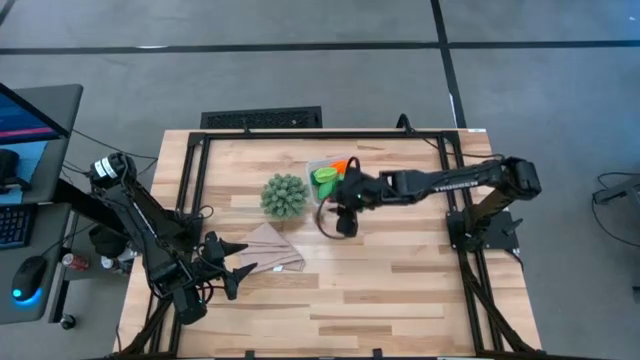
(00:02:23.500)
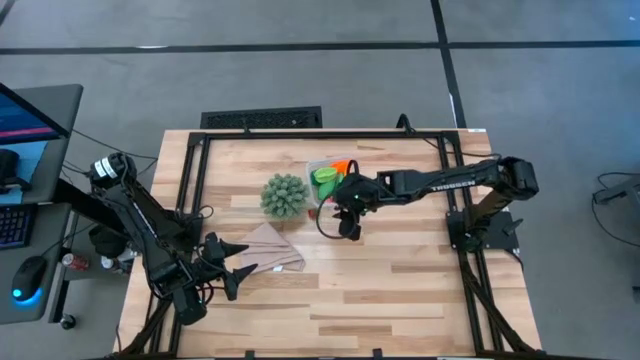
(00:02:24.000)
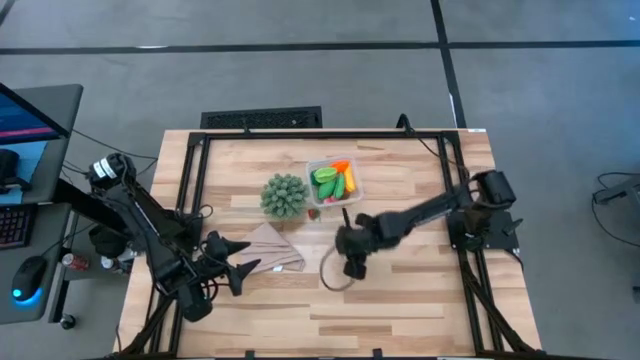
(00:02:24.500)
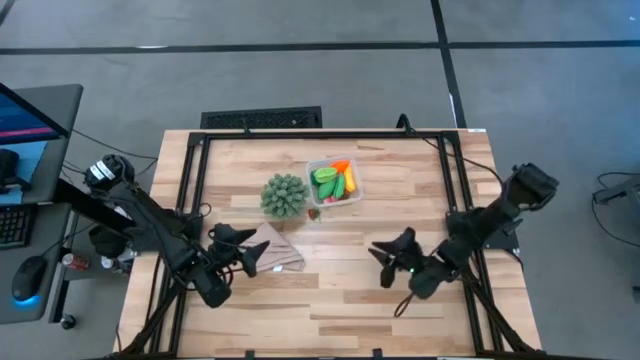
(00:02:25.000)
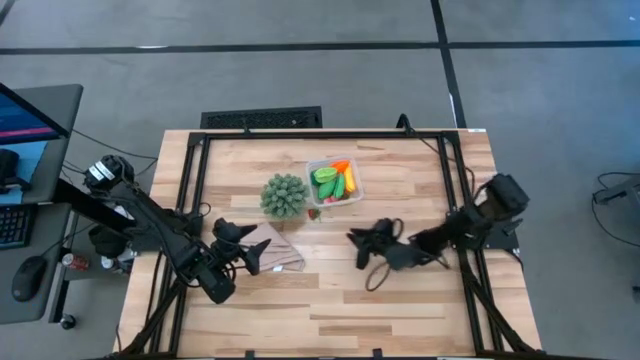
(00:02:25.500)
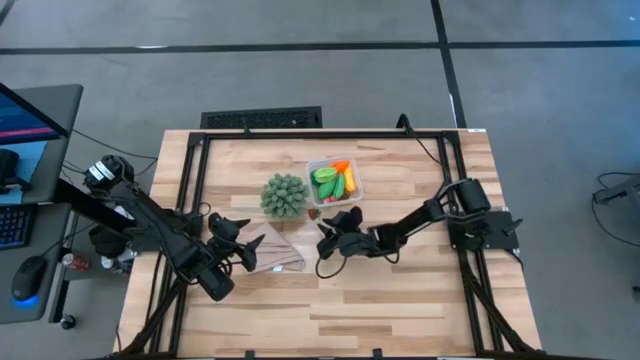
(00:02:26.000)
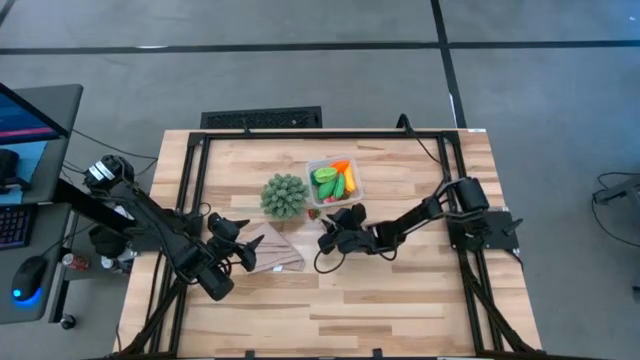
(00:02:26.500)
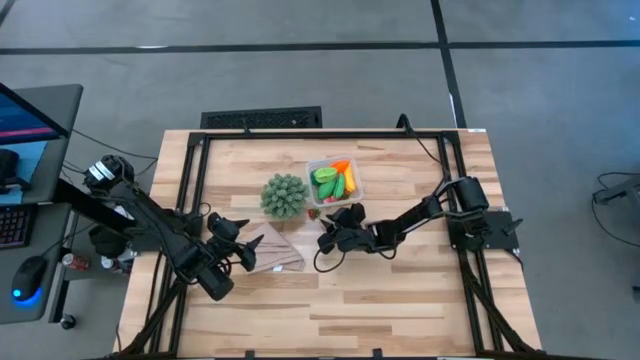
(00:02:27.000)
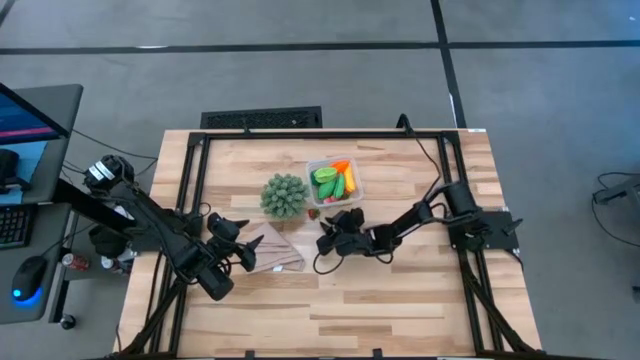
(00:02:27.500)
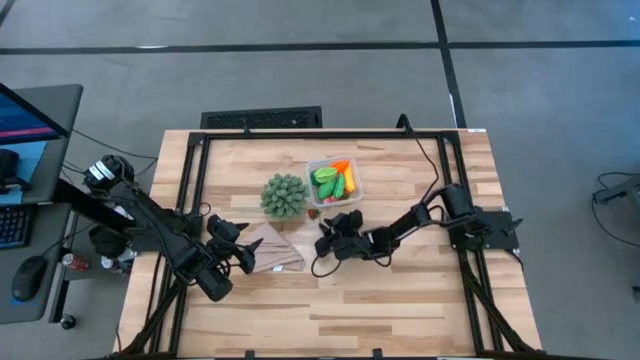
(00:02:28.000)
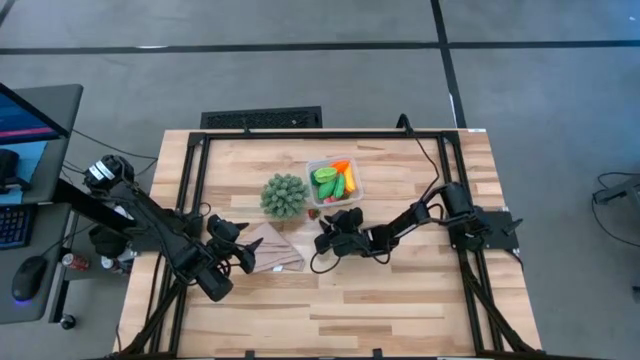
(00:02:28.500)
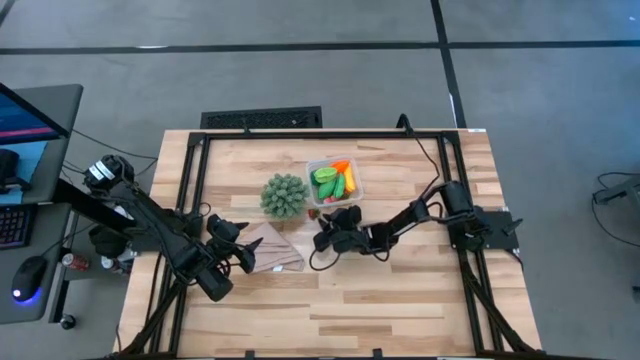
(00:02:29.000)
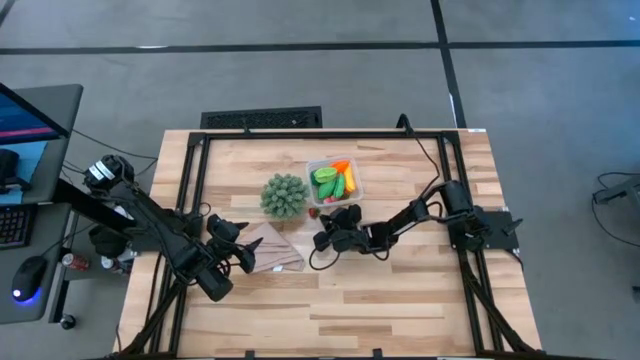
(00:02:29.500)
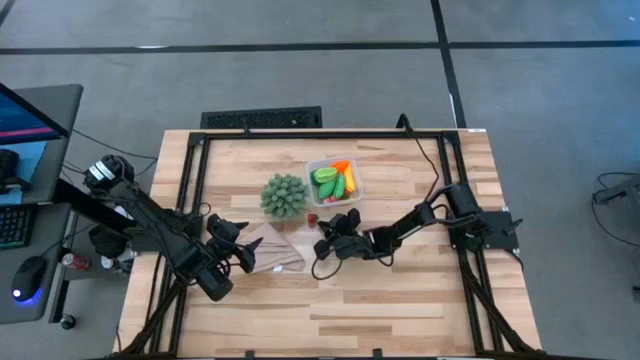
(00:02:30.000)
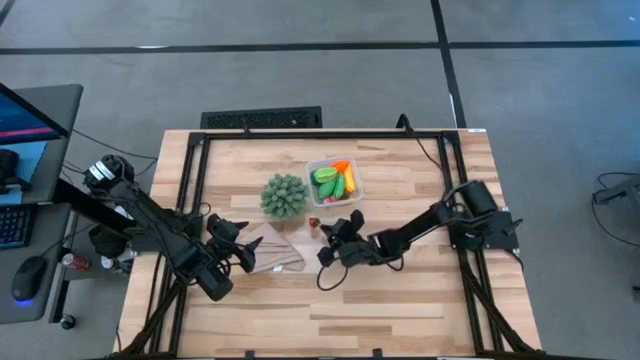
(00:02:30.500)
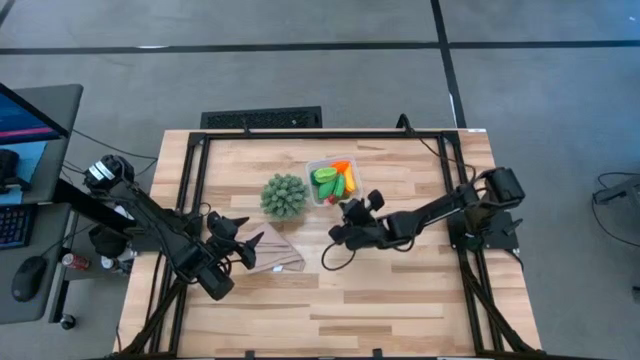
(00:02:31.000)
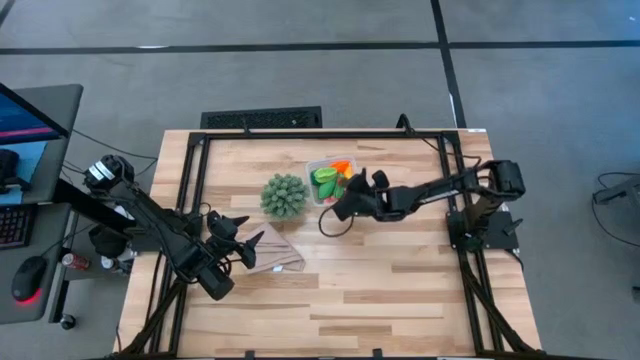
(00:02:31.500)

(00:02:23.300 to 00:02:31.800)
Task: Pick and placing Produce into tupperware
Put the strawberry into the transparent bin

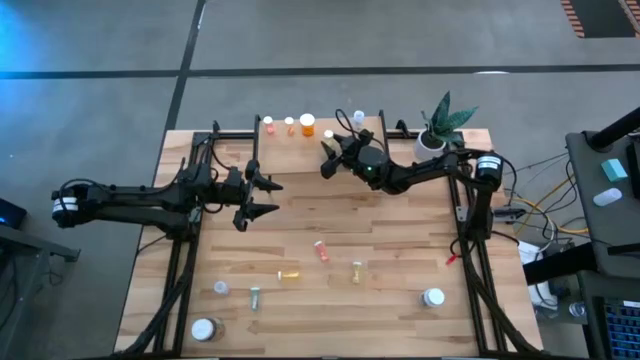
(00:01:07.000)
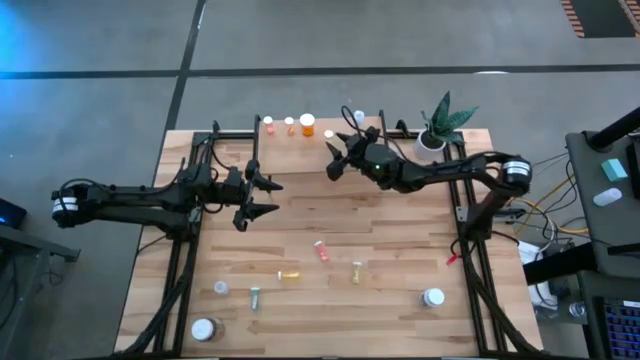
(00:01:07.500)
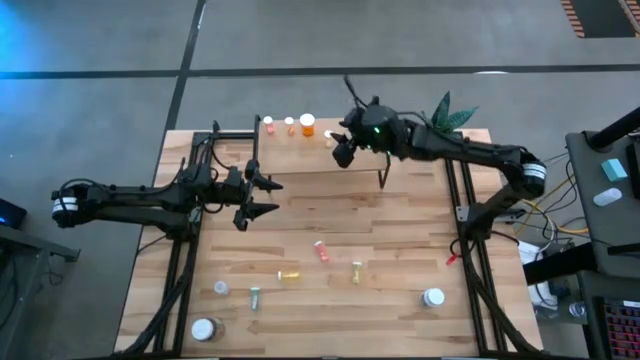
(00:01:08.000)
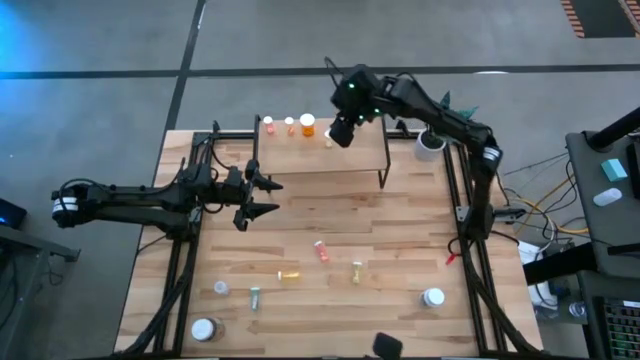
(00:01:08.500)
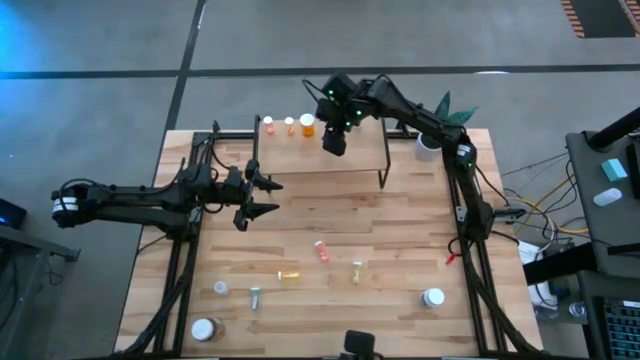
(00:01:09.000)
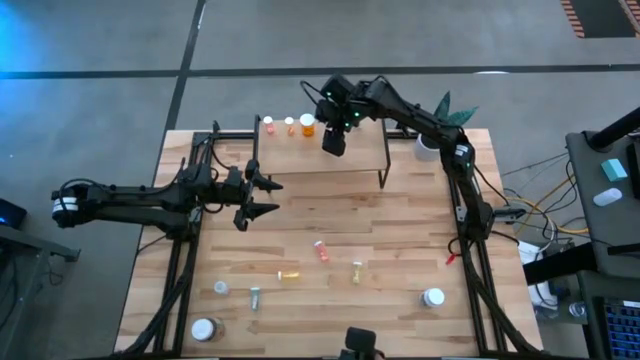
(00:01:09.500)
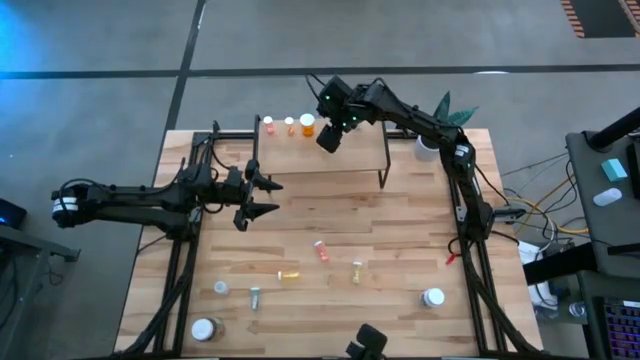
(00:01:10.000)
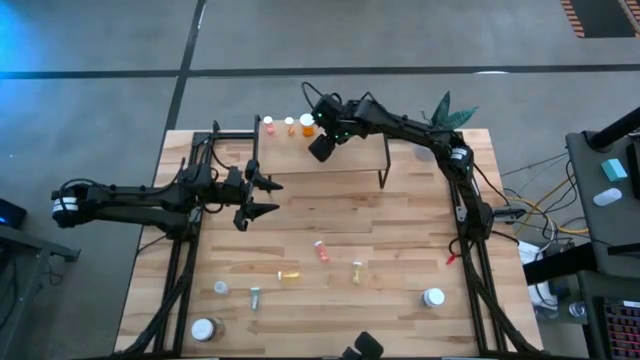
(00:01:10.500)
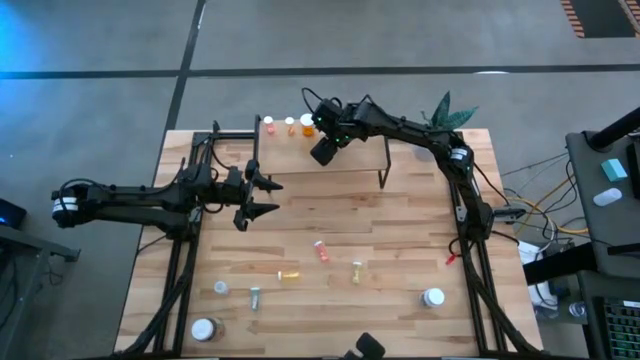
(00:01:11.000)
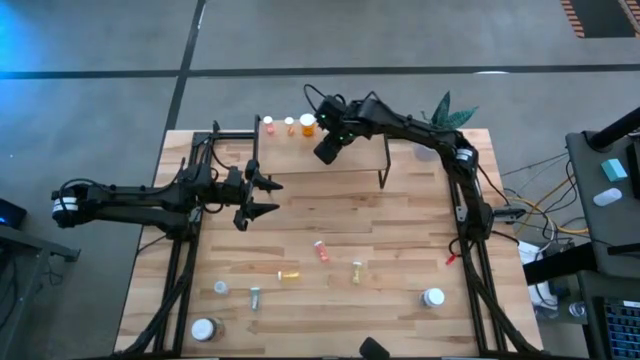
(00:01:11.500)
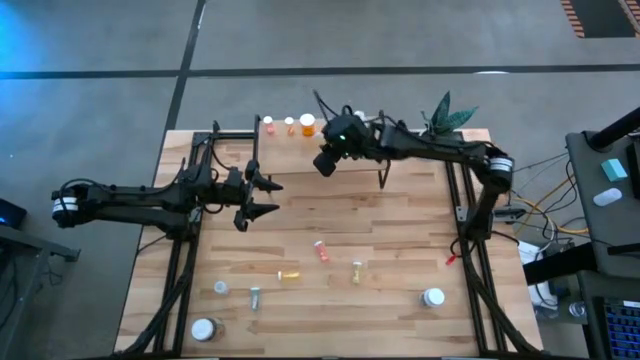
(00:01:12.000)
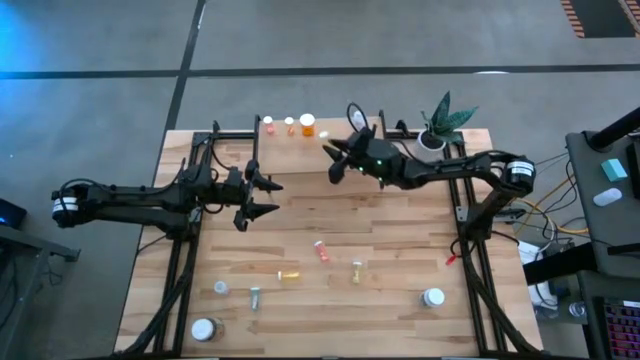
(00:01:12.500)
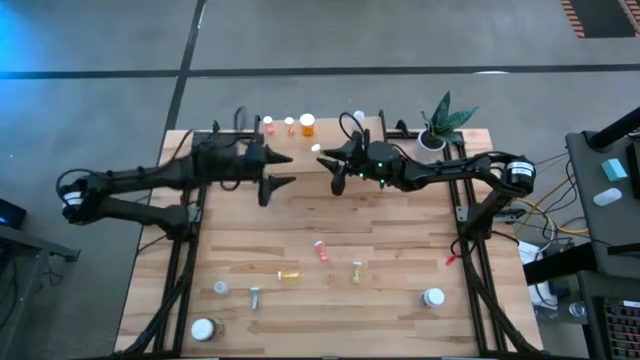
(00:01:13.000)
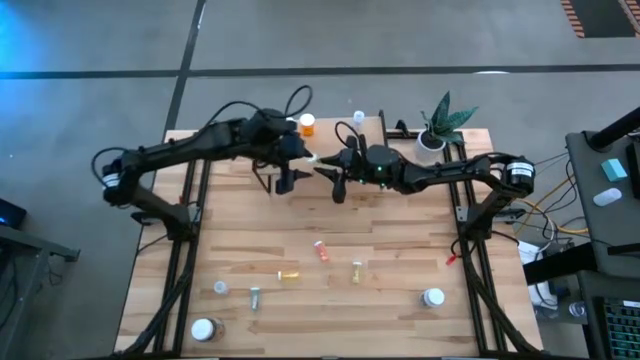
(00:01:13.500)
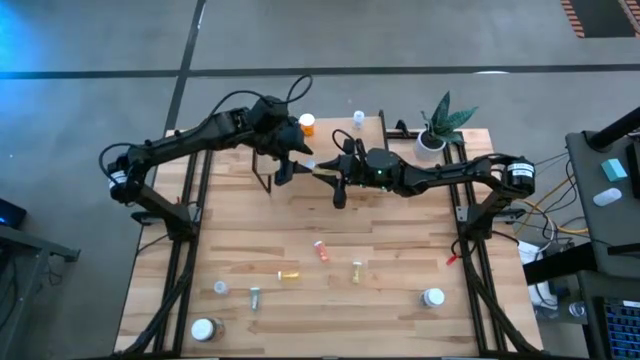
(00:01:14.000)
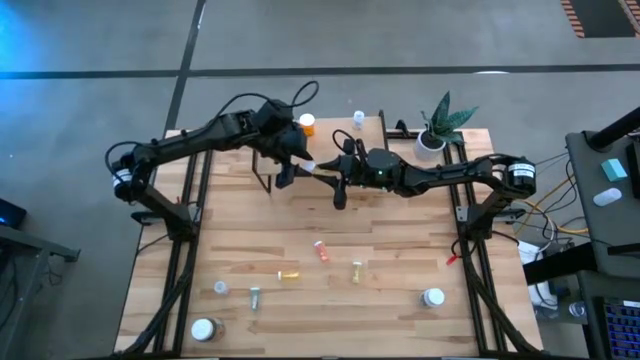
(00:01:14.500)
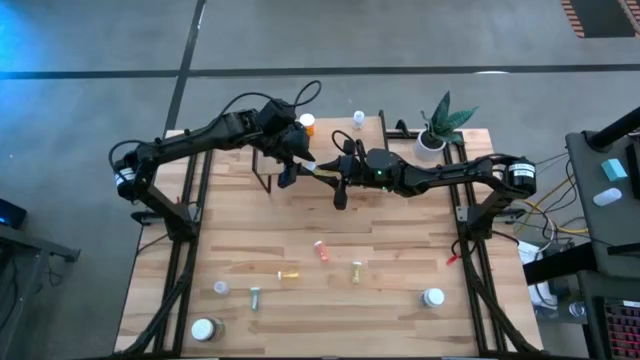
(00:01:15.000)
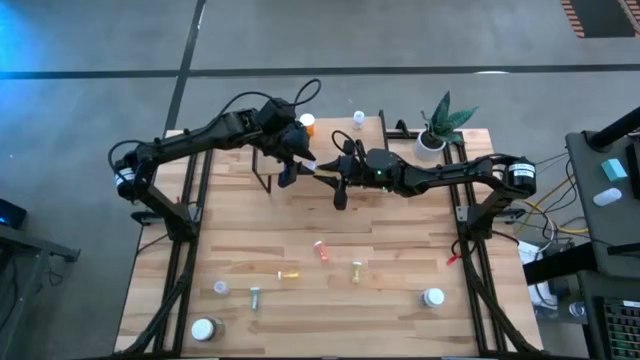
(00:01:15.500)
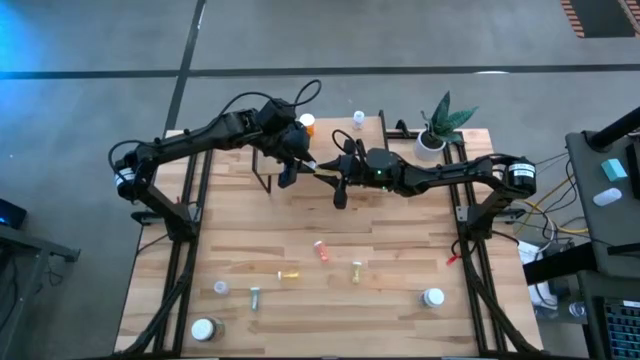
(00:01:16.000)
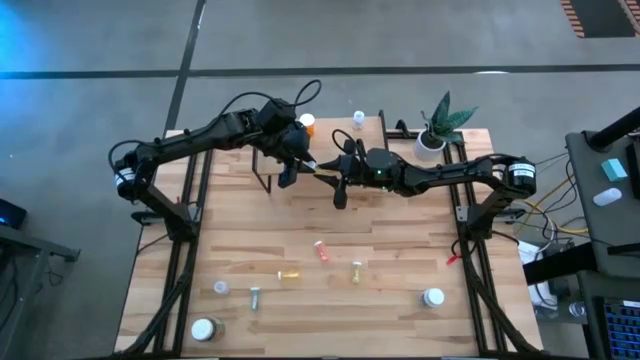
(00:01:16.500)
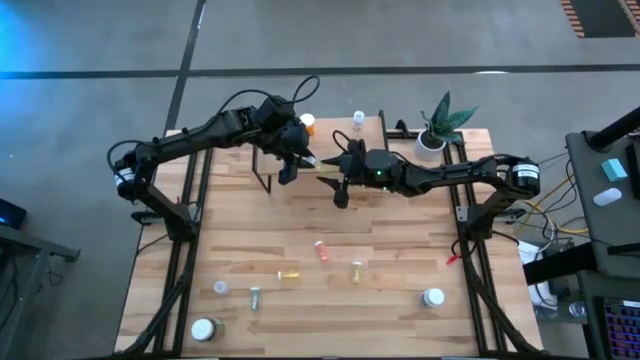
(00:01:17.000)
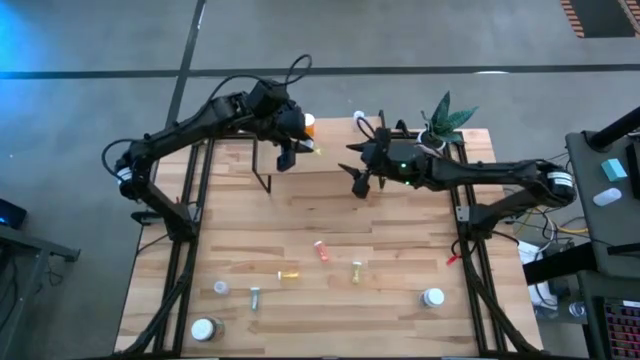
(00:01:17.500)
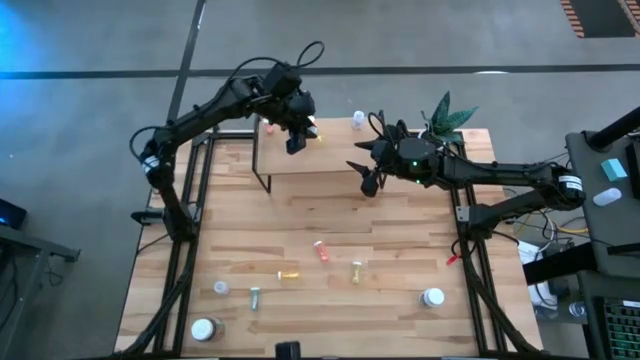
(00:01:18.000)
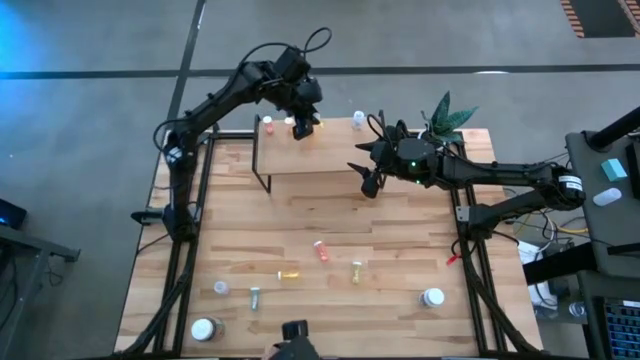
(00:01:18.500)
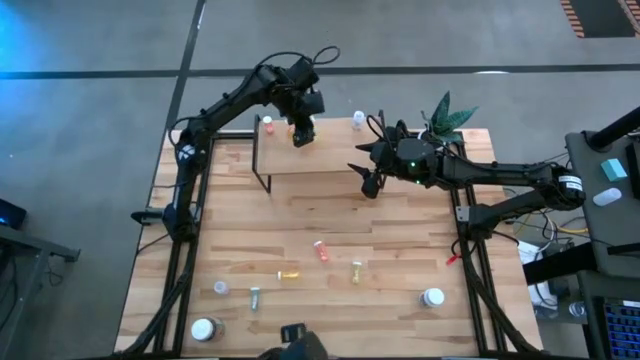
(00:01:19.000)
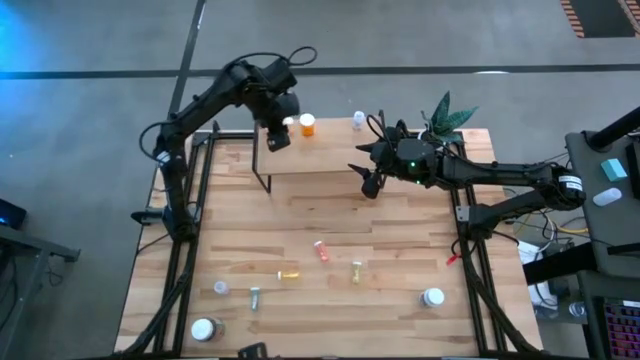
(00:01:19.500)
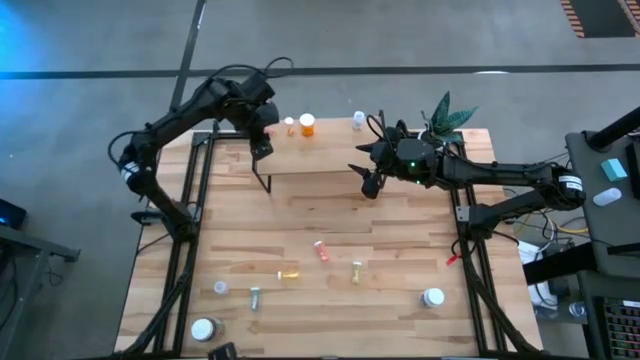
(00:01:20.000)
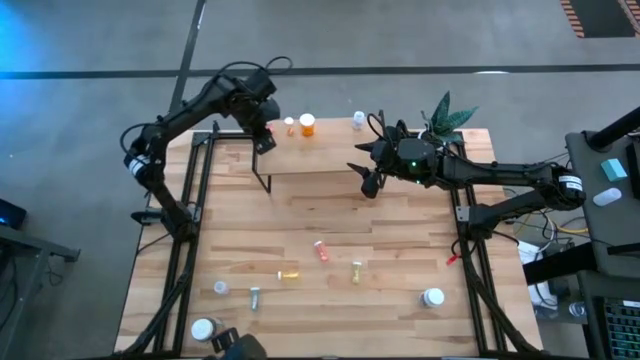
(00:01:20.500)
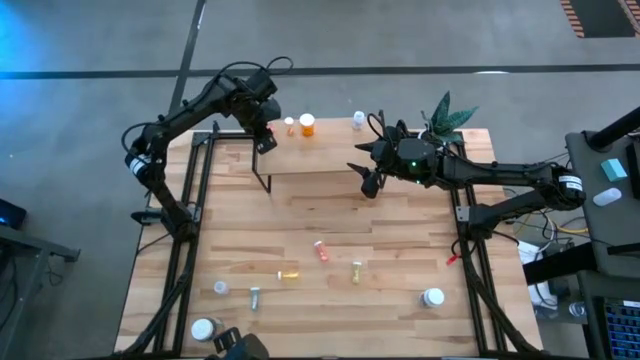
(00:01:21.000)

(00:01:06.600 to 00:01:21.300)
Task: Pick and place medicine bottles onto shelf by color
Put the right yellow pill bottle on the shelf
